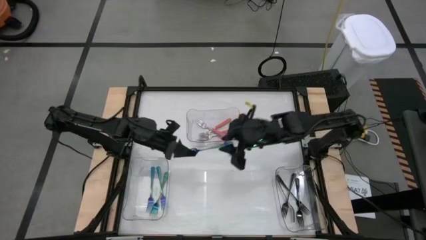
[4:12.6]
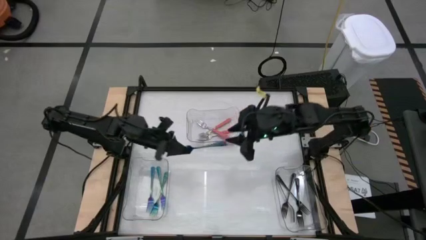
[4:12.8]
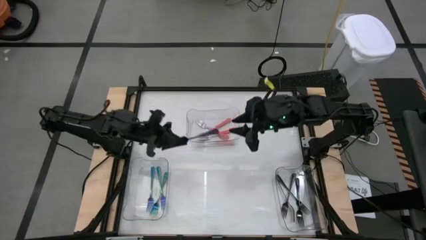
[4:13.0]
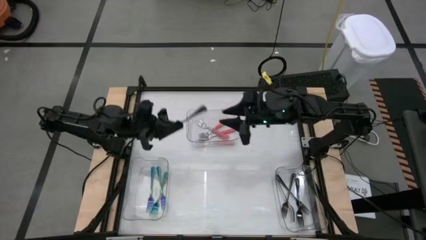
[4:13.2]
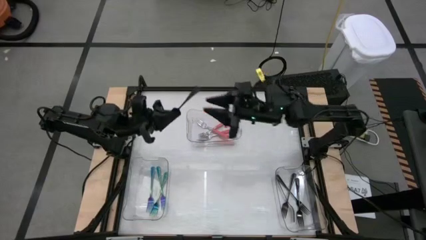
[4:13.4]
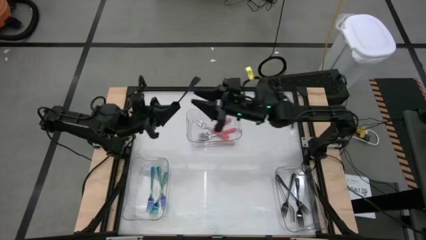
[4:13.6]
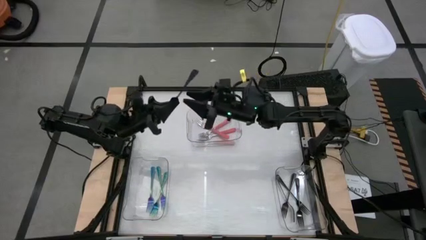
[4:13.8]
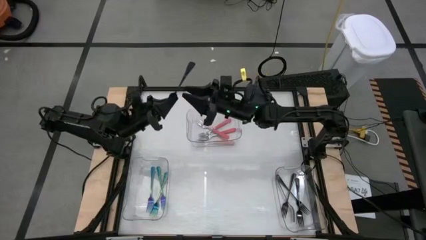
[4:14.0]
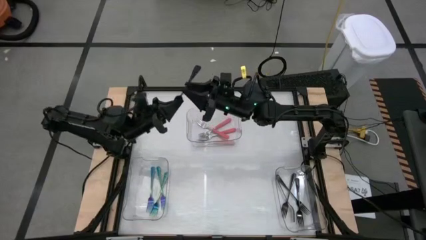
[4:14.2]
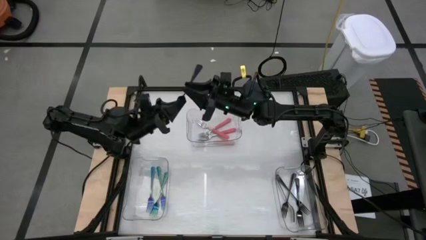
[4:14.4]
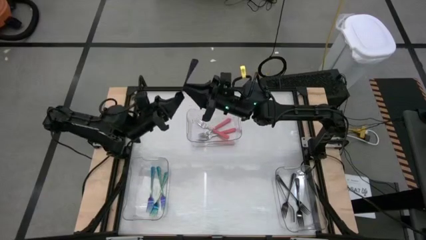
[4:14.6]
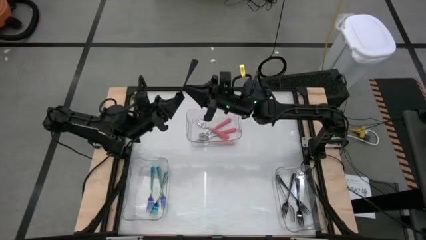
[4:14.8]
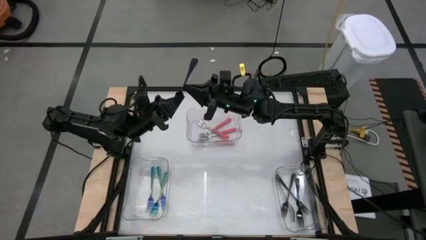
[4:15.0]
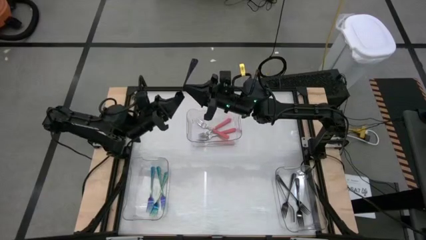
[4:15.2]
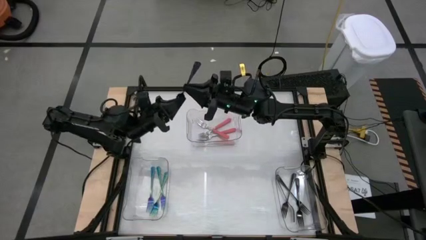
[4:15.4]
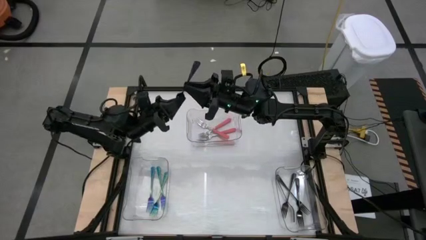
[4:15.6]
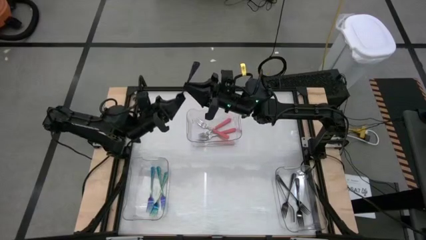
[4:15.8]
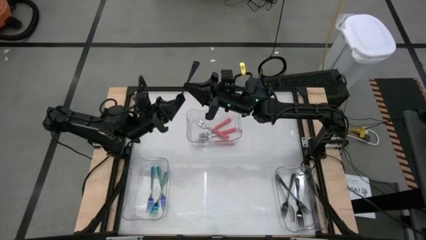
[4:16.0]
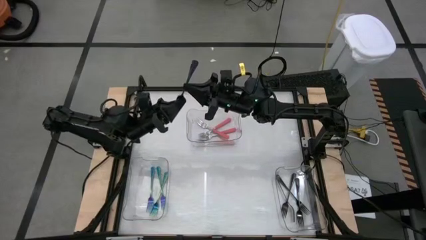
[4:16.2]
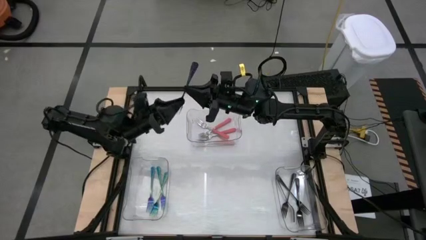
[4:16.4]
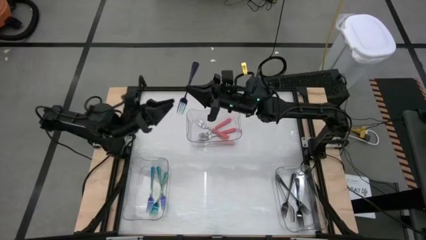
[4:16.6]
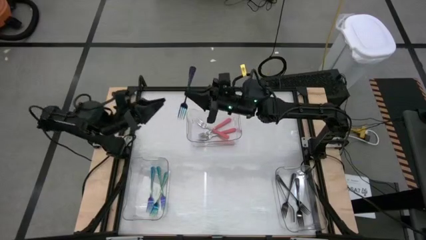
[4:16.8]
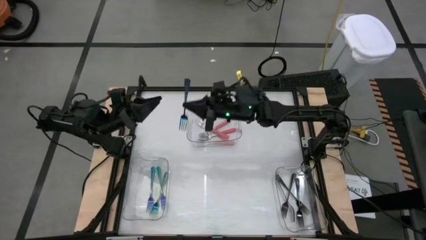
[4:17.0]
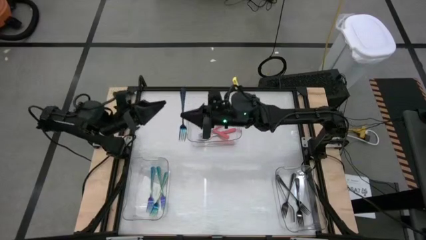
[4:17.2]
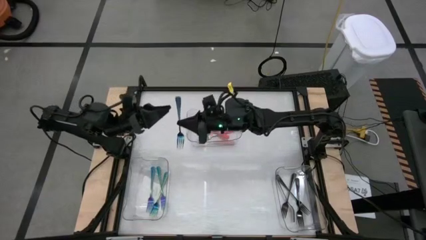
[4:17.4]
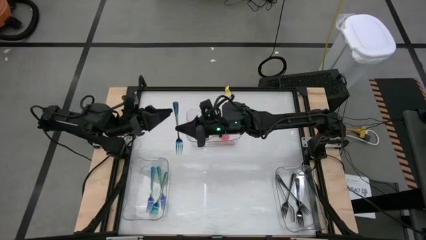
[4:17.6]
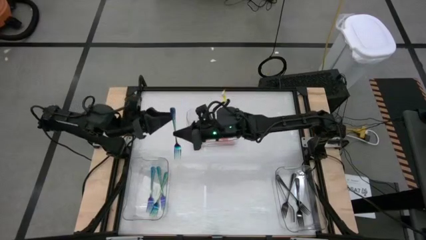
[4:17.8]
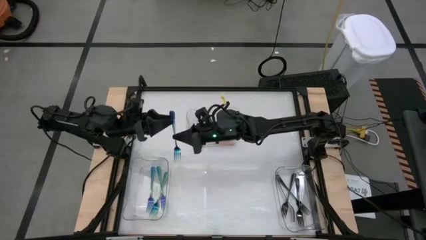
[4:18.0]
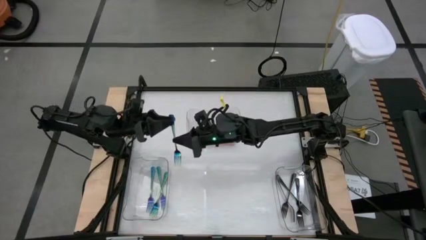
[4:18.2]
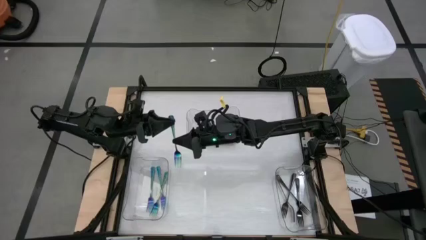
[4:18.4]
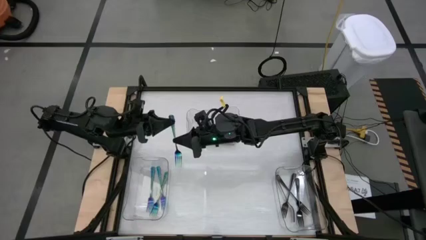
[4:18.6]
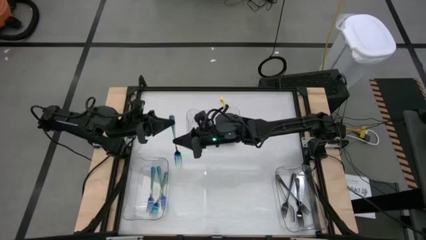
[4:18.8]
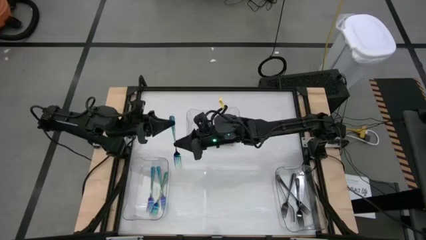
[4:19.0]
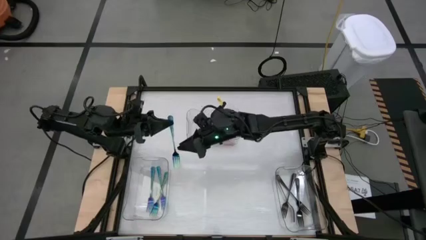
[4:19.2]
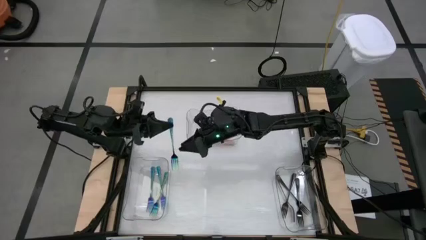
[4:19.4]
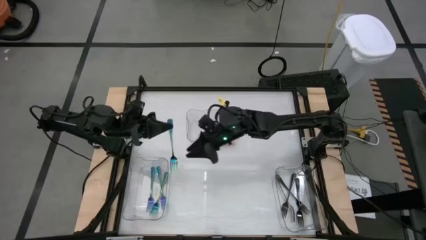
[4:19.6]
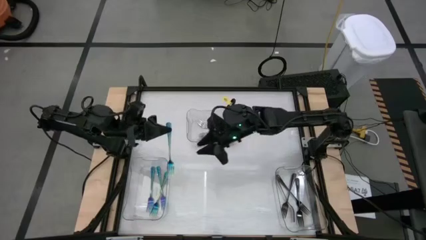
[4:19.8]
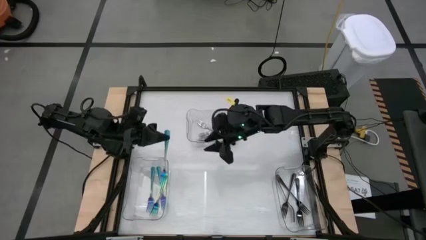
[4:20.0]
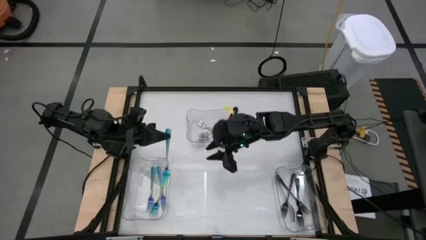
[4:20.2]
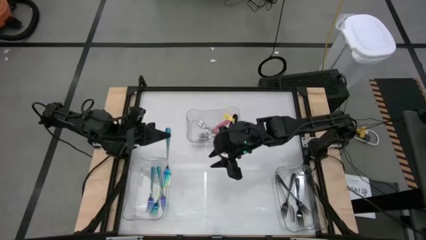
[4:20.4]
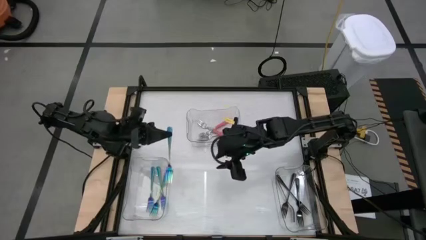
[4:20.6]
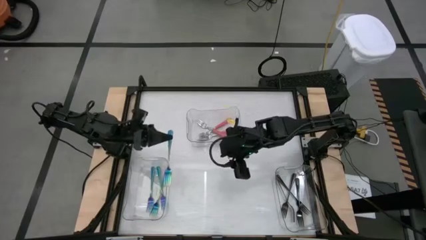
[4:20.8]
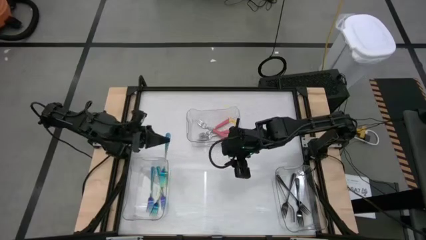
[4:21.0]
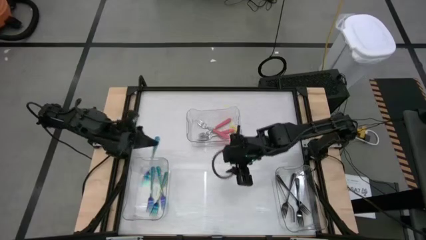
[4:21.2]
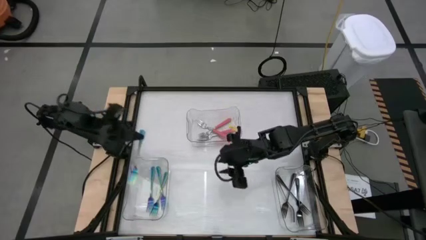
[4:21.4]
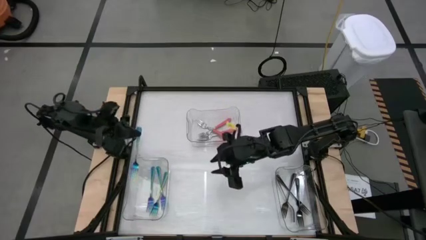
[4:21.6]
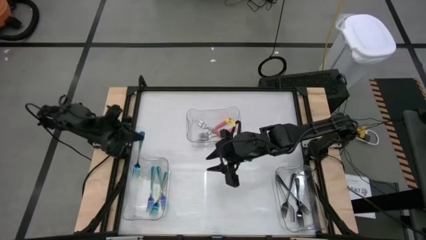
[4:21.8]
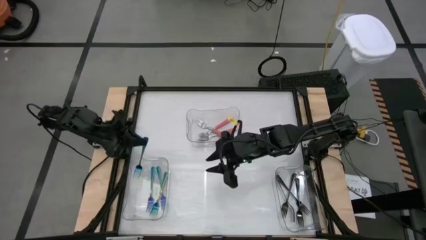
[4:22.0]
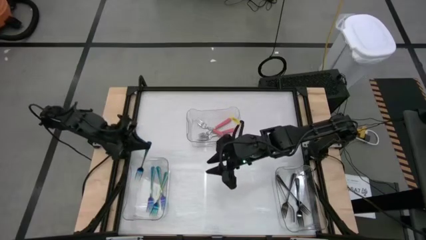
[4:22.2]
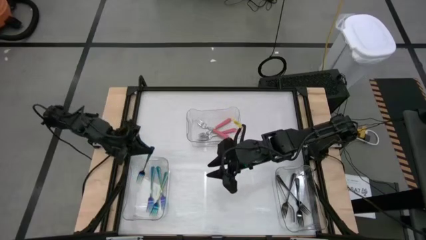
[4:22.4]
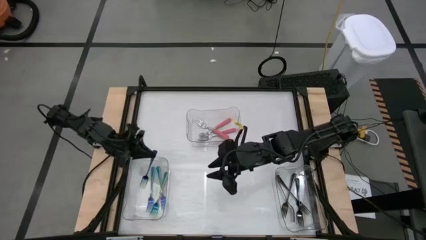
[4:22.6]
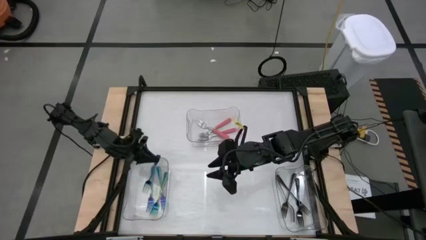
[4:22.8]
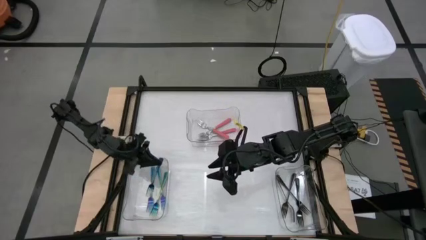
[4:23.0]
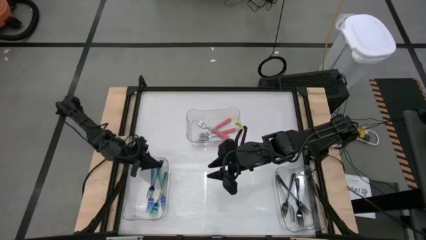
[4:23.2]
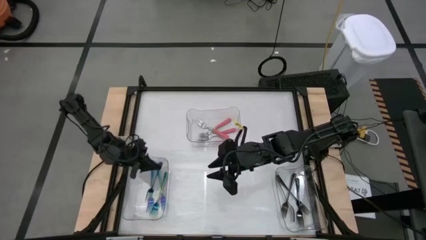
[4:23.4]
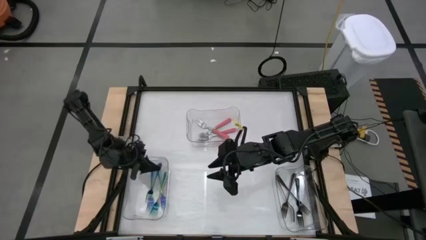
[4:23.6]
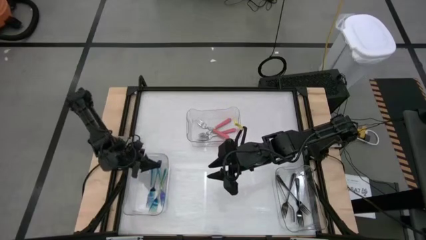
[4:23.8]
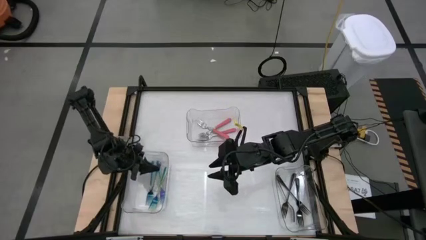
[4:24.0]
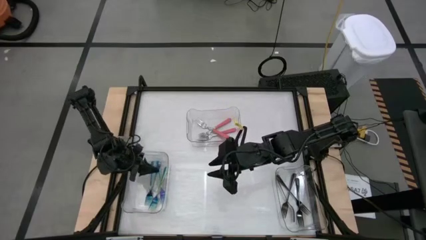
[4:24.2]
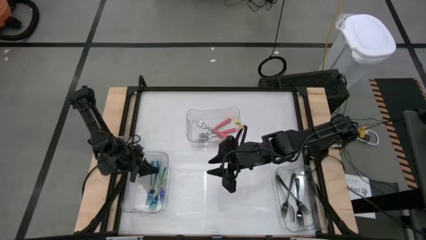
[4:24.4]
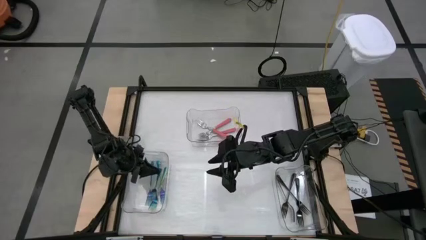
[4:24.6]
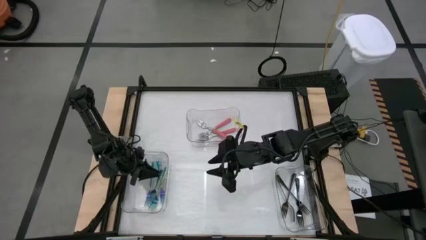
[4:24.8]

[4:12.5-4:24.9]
Task: Sort silverware by color (type)
Put the blue fork into the left transparent bin
